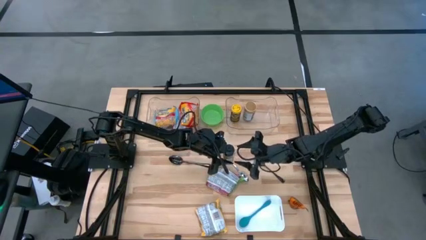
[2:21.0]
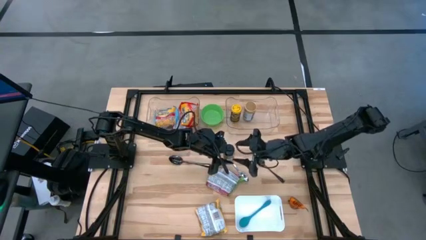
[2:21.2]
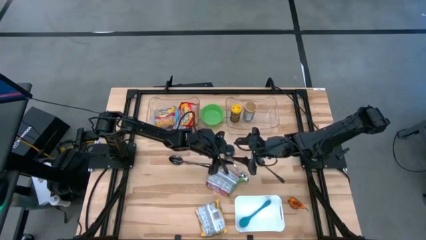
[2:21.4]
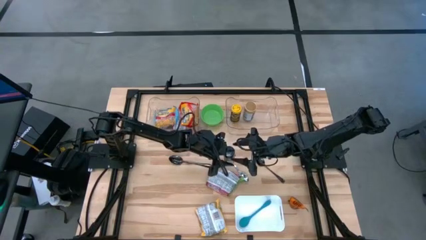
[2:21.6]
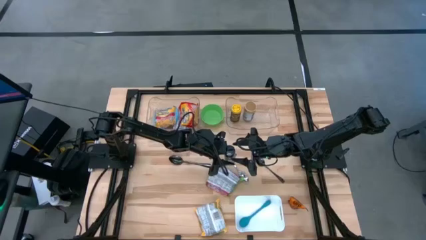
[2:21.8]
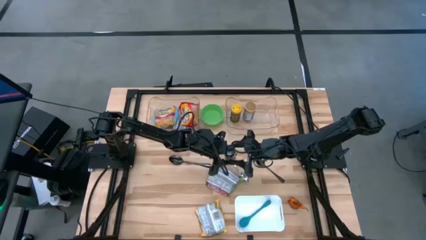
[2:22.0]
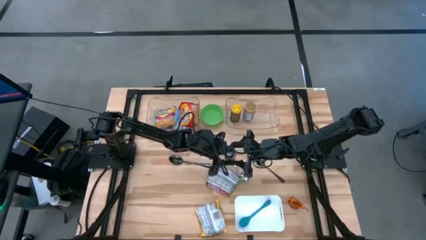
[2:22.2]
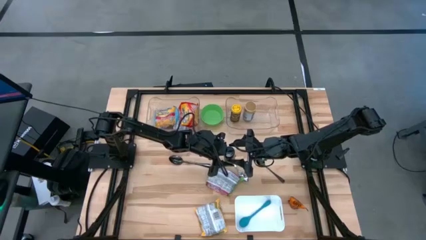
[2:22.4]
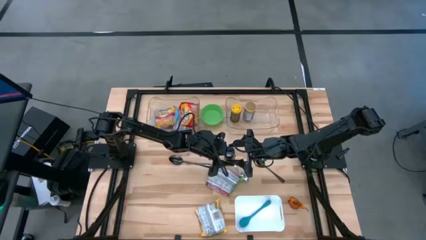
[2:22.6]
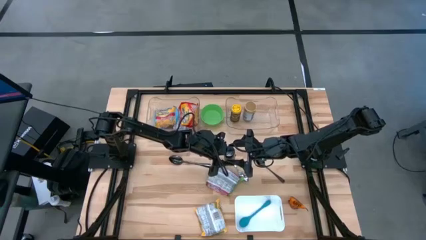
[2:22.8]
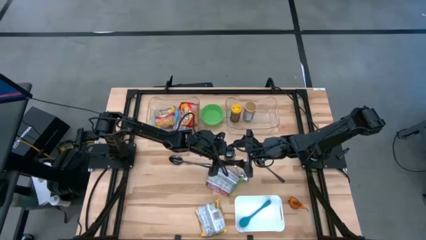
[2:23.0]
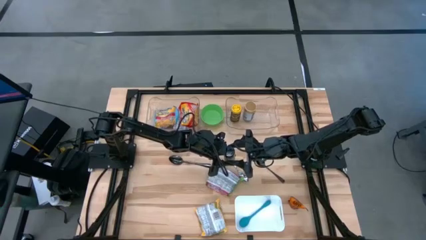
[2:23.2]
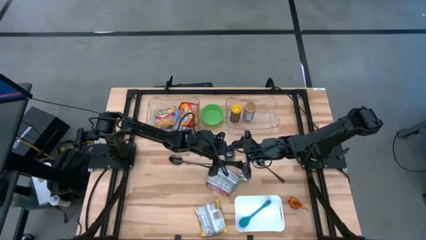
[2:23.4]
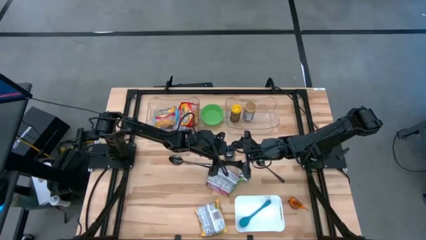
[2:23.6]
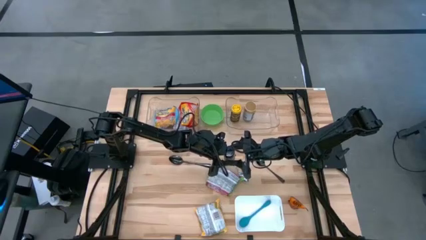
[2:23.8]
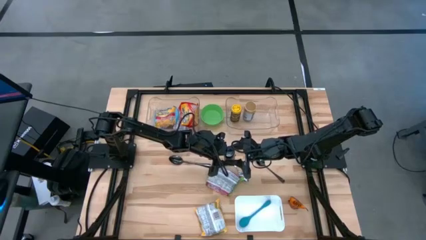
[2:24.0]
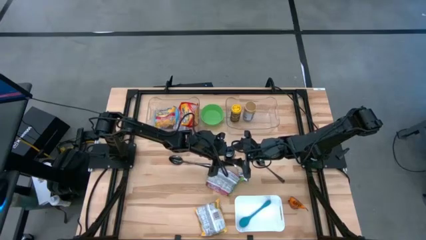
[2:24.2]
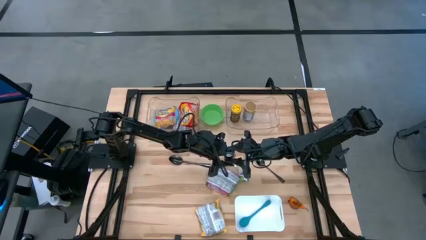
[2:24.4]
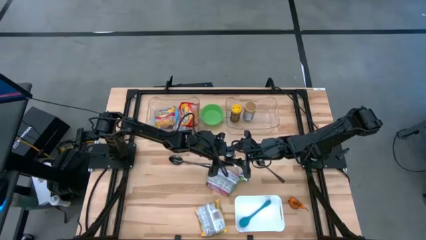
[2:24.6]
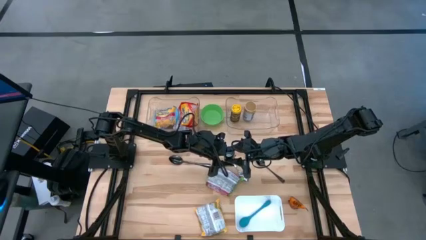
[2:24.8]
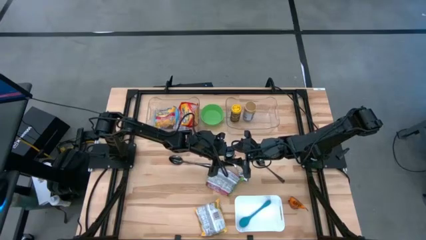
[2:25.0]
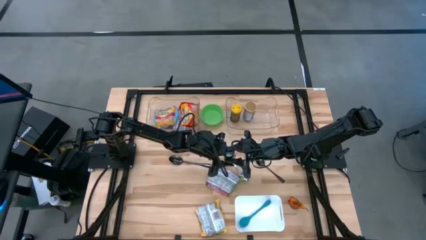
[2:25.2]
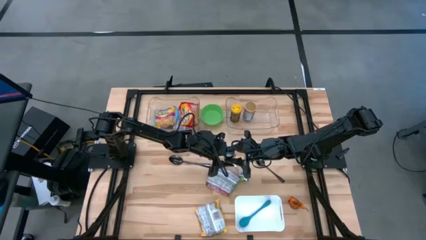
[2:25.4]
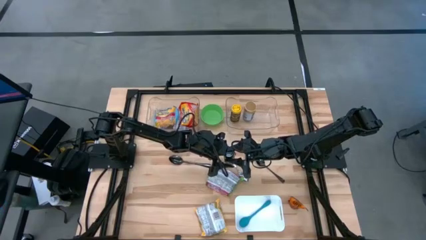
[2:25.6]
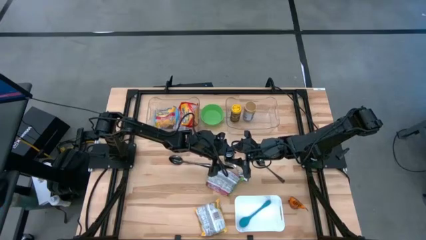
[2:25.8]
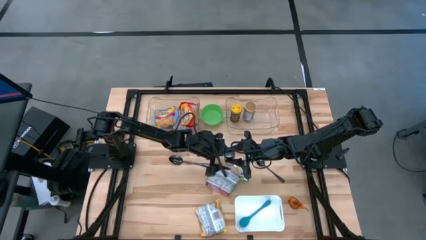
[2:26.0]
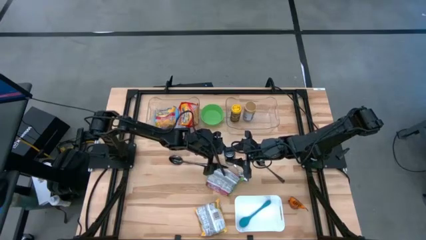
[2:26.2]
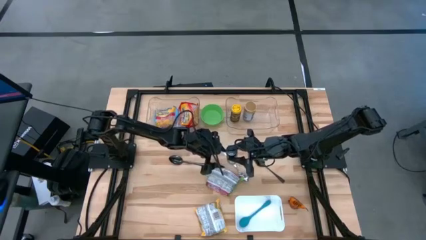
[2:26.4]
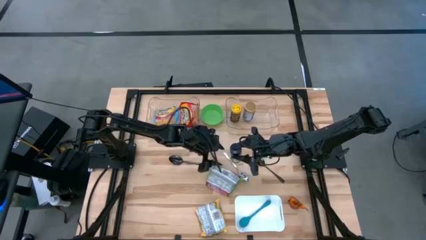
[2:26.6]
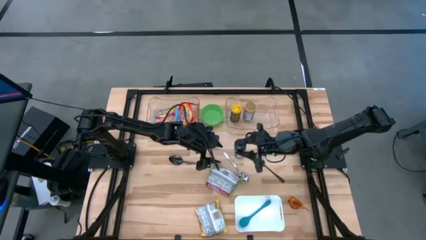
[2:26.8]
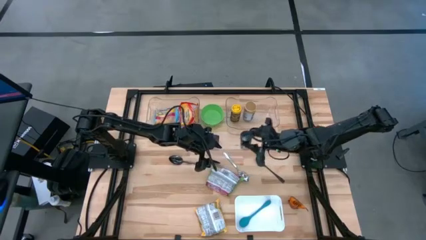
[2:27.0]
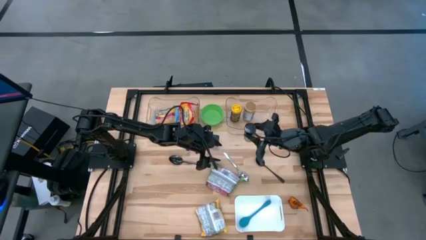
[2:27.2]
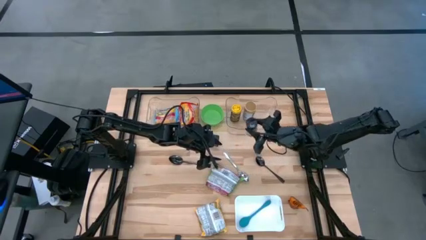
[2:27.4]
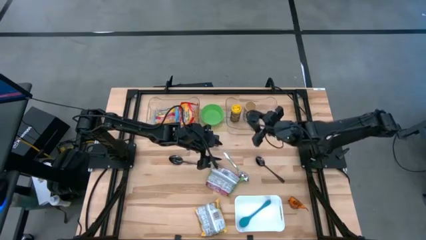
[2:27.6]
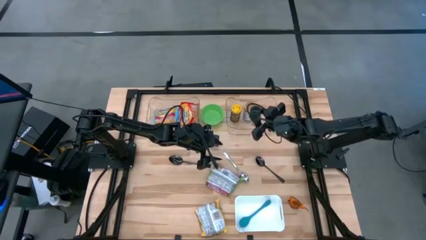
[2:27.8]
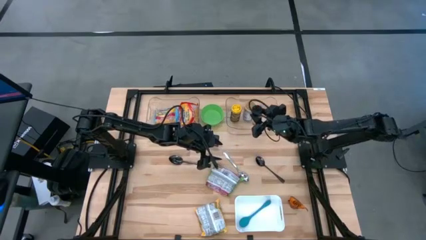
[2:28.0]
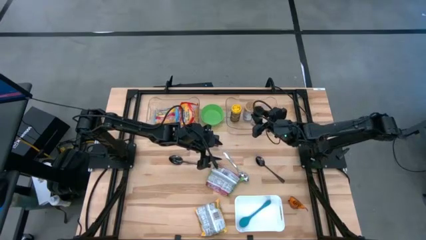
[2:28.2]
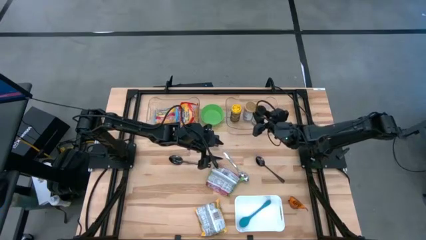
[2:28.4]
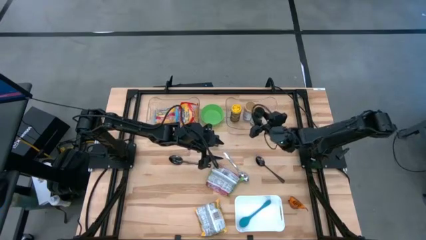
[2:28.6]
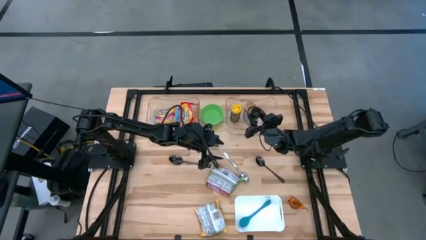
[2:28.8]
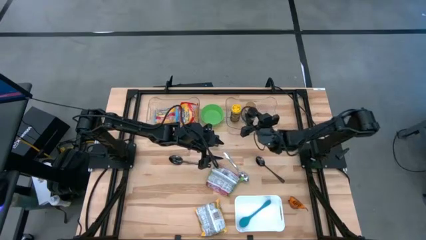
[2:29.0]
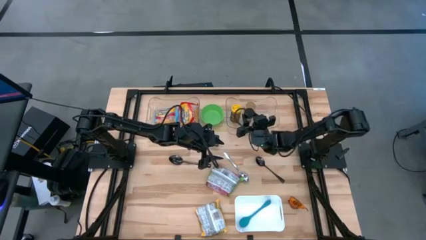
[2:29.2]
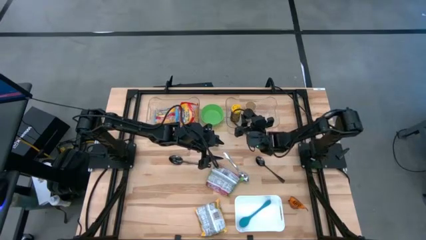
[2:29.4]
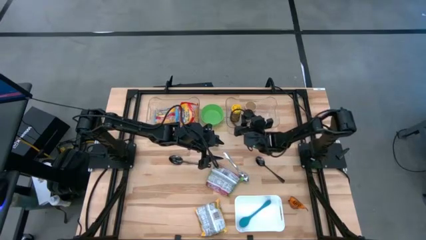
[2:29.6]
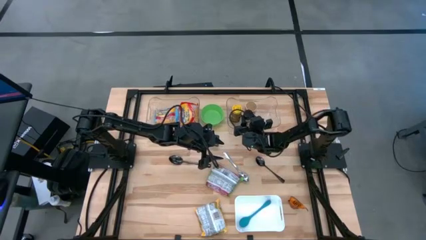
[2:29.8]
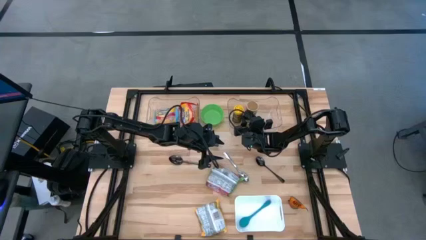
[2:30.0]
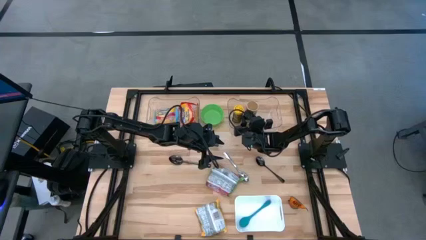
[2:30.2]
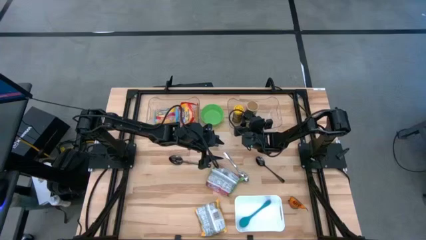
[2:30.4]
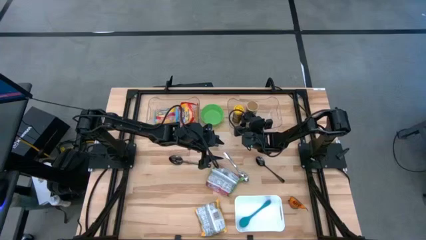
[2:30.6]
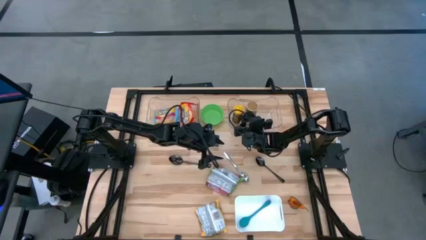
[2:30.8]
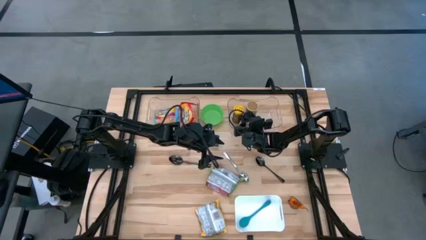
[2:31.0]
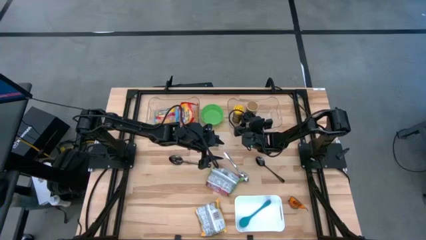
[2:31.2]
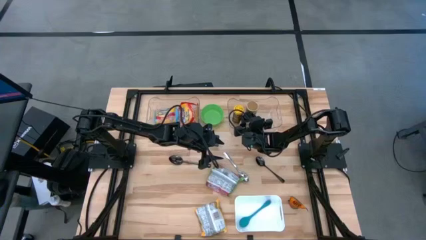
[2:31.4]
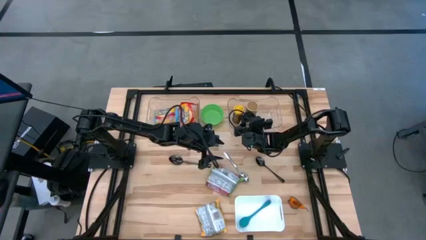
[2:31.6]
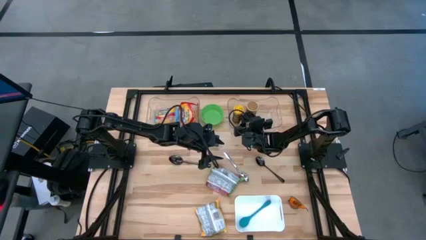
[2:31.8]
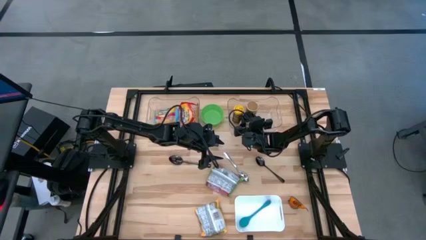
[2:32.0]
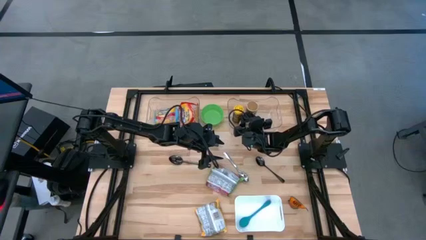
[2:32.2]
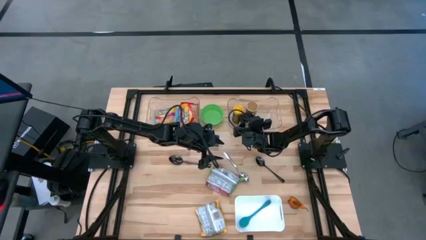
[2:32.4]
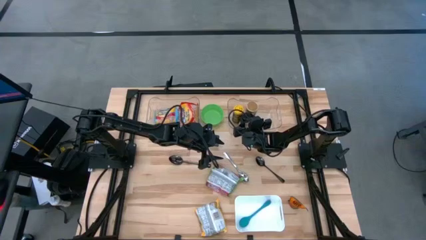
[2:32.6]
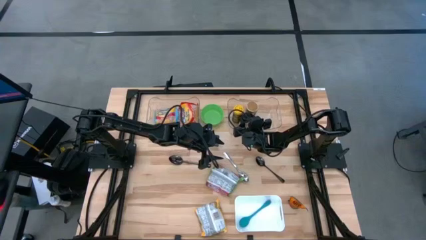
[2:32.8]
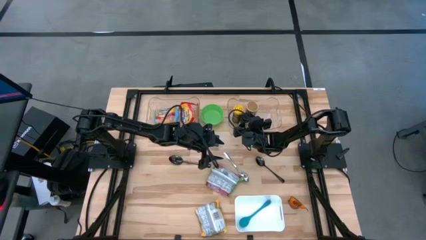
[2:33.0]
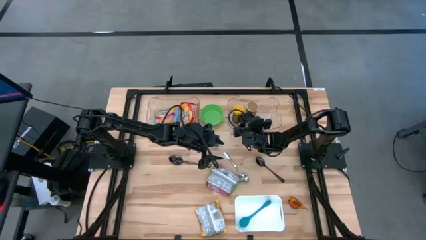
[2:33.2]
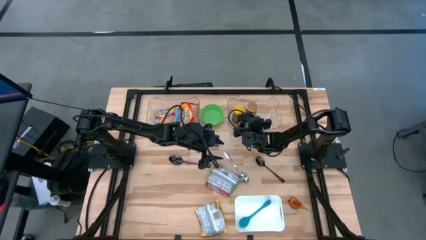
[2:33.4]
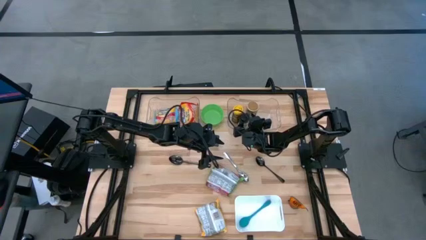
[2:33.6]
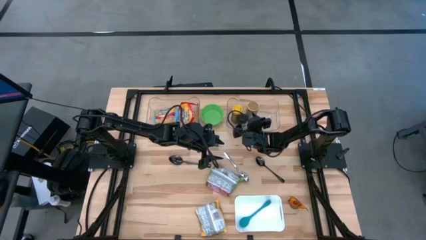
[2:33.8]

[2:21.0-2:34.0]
Task: Pick & Place Food Item
Put the transparent spice bottle in the right transparent bin
